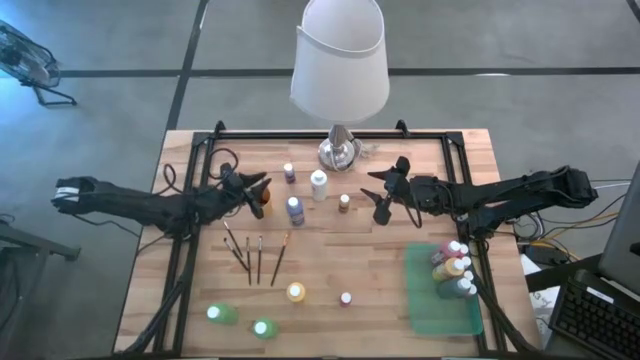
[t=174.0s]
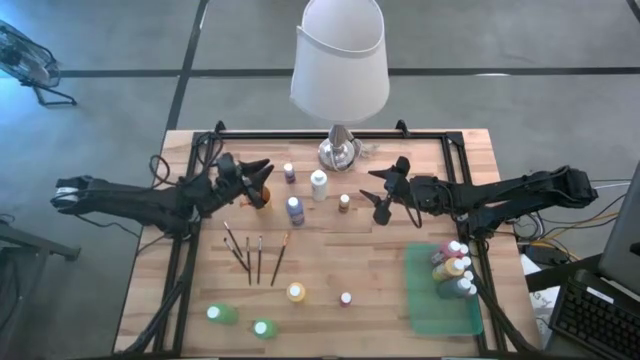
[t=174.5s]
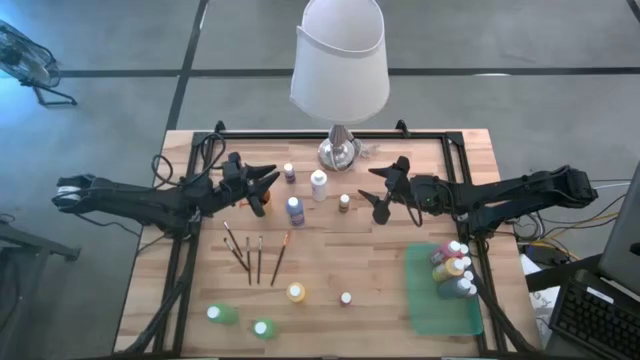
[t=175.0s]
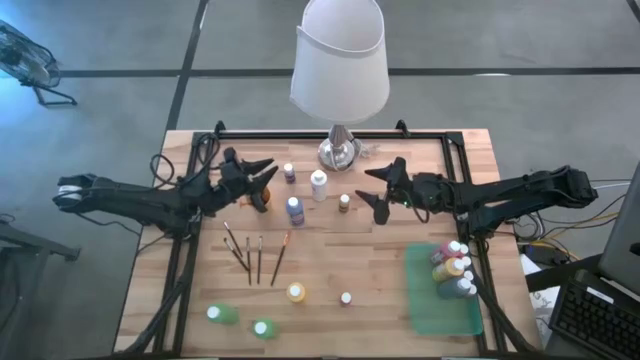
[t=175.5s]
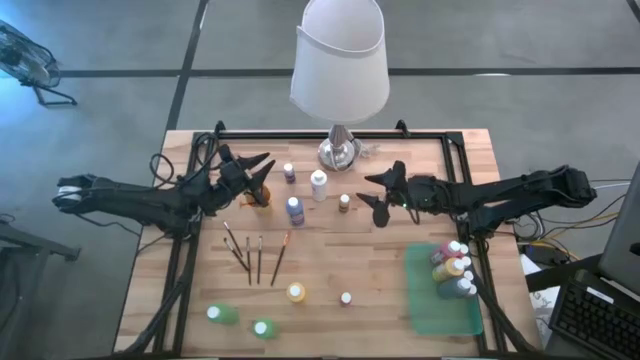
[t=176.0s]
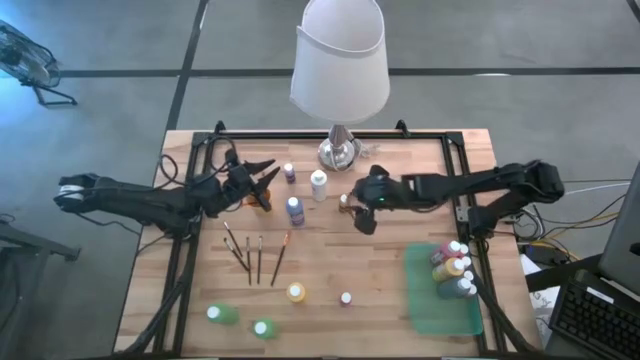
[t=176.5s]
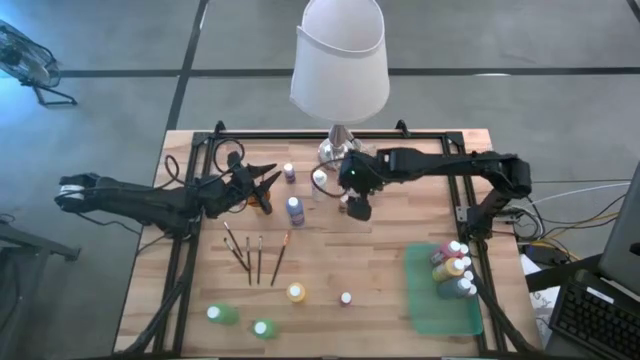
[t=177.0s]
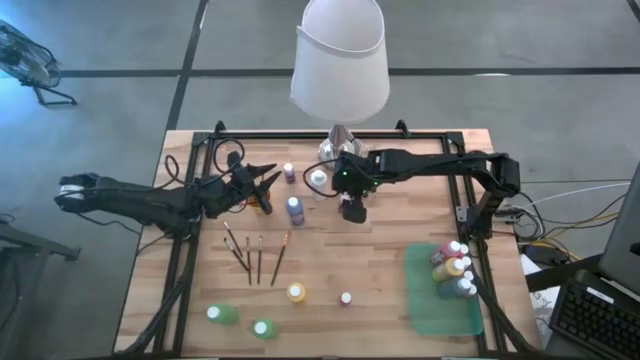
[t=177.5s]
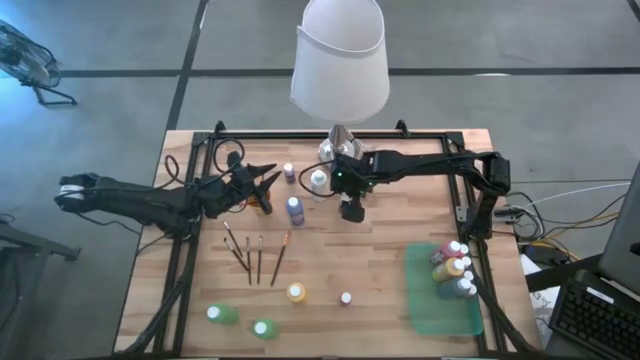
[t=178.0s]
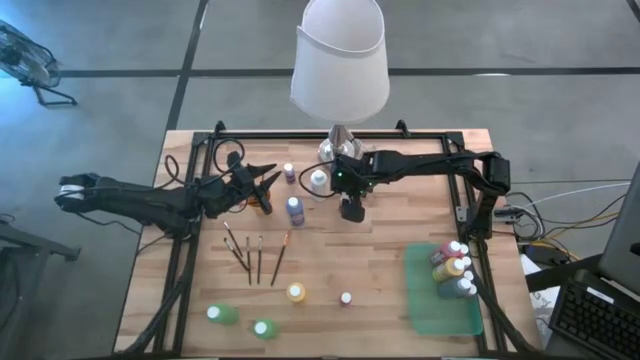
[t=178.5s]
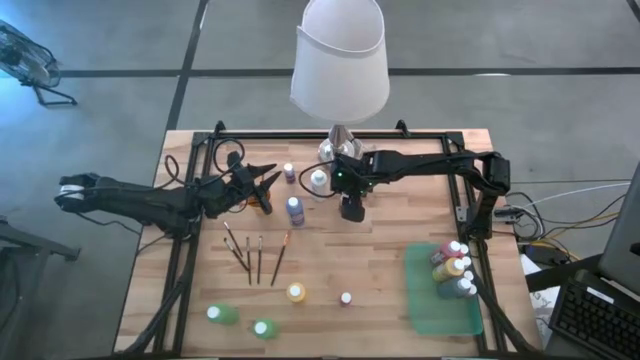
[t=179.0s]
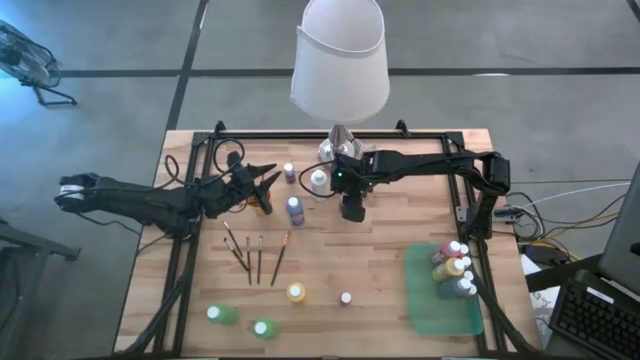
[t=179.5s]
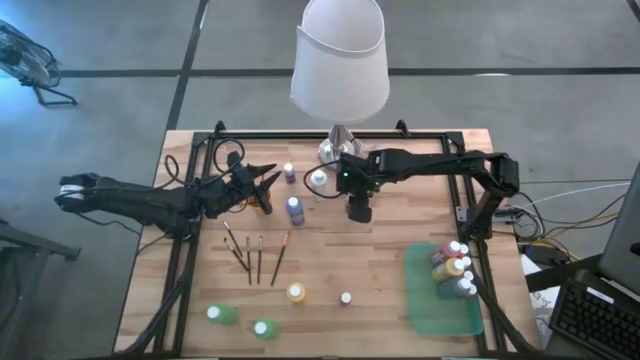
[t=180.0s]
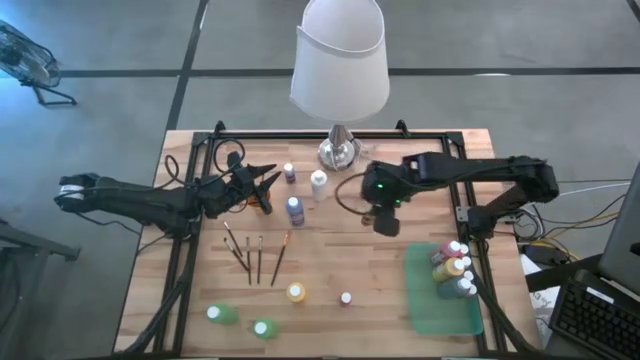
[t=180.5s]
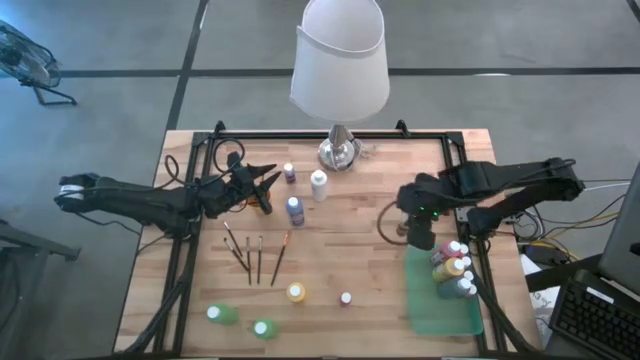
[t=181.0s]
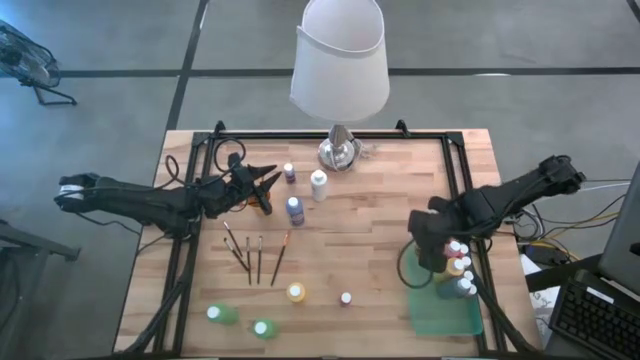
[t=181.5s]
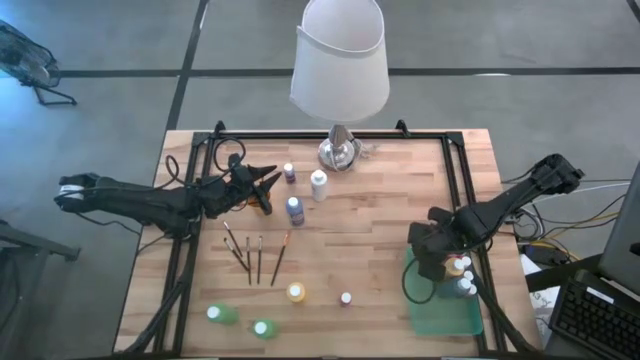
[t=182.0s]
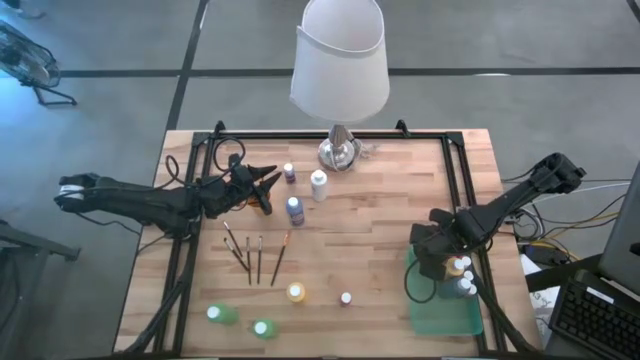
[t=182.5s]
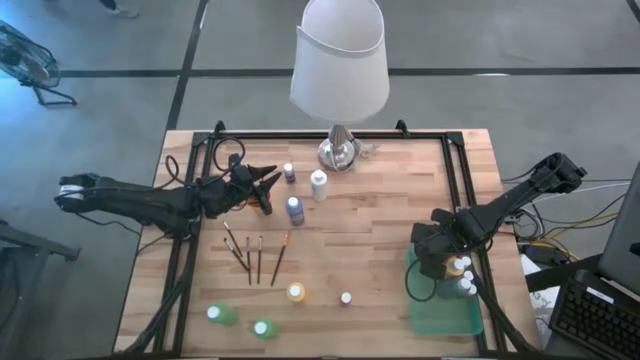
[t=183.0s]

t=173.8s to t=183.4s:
Task: Pick & Place Paint Supplies
Put the yellow paint bottle into the green bin

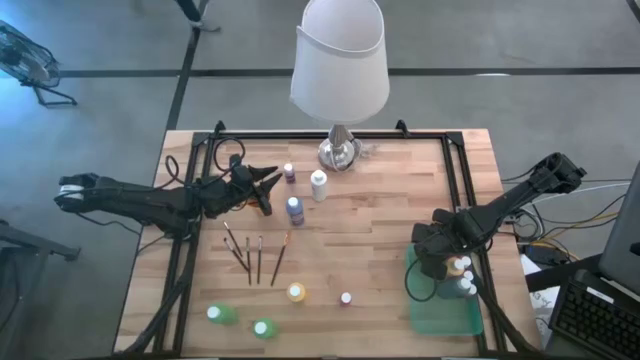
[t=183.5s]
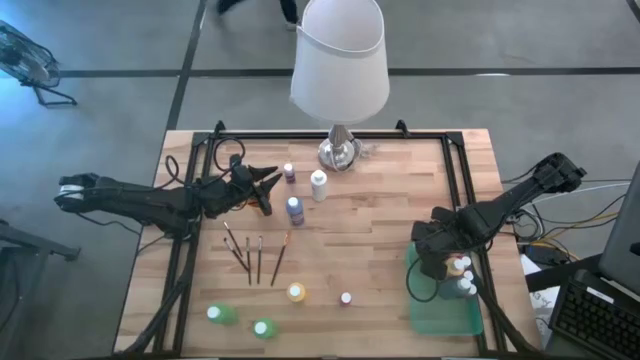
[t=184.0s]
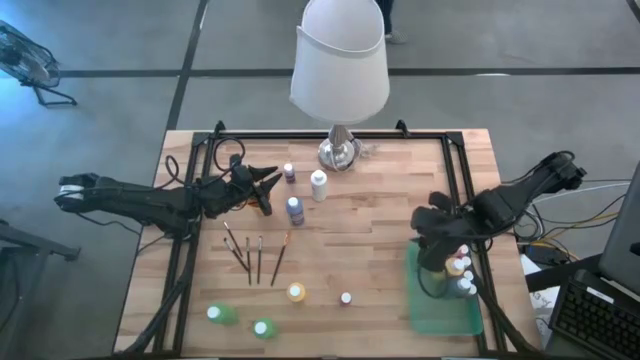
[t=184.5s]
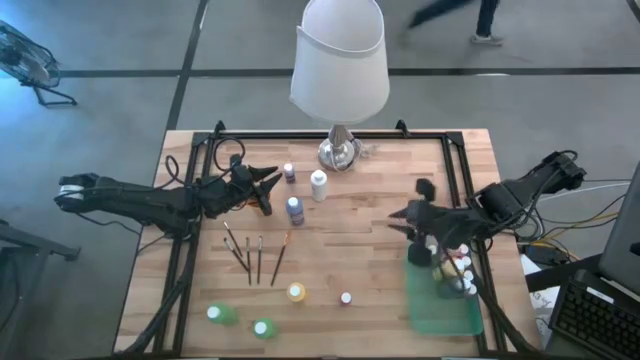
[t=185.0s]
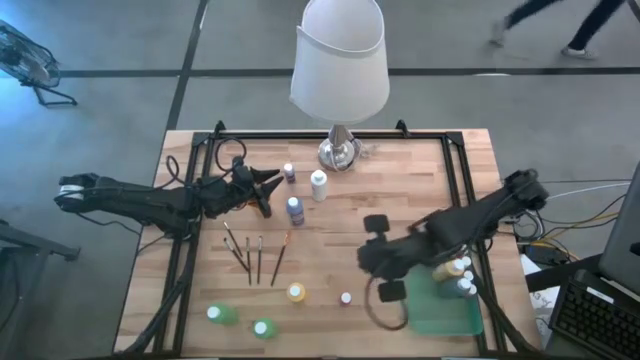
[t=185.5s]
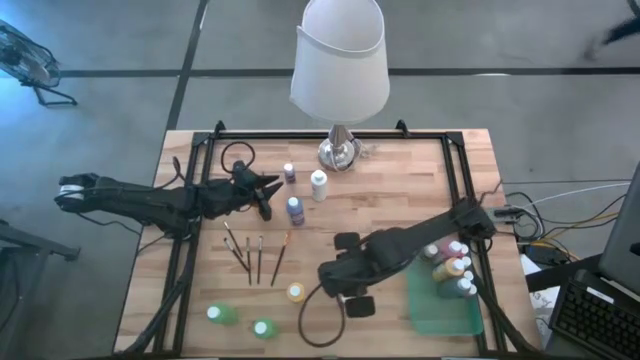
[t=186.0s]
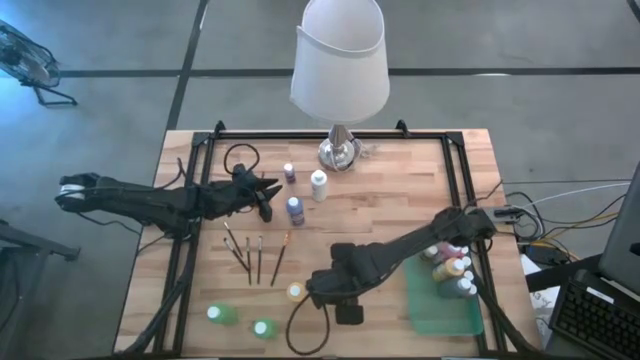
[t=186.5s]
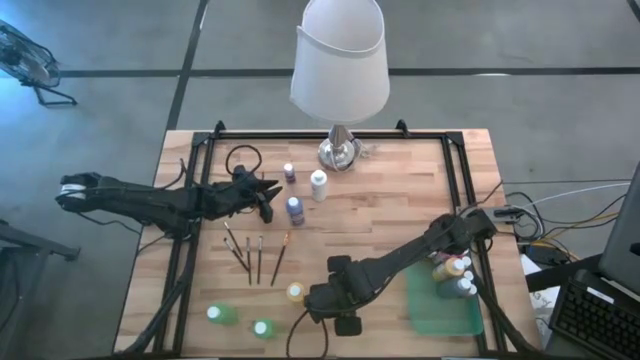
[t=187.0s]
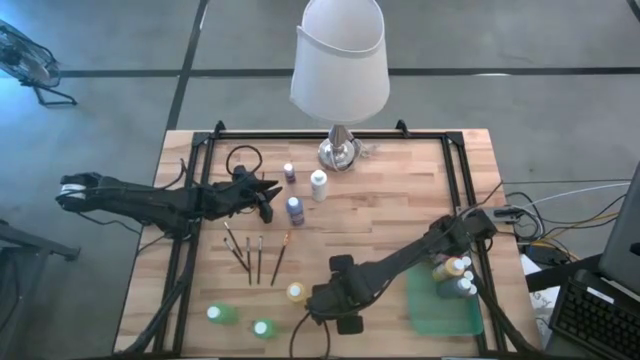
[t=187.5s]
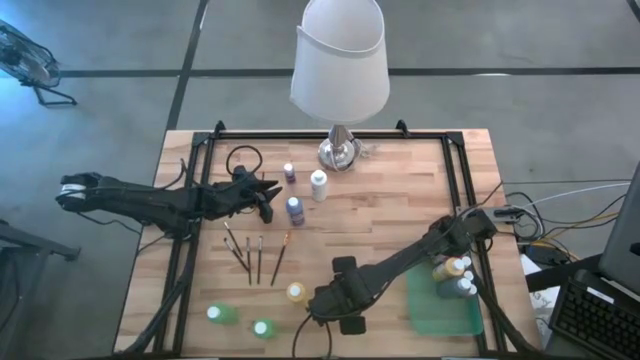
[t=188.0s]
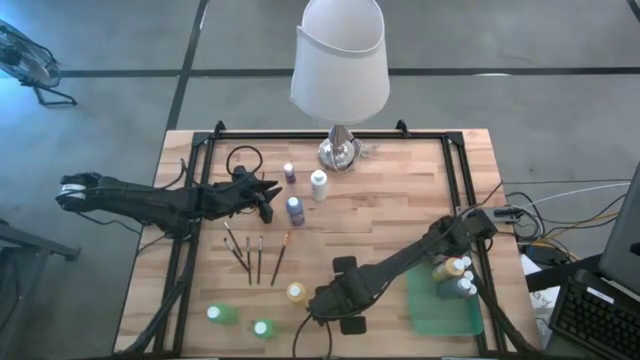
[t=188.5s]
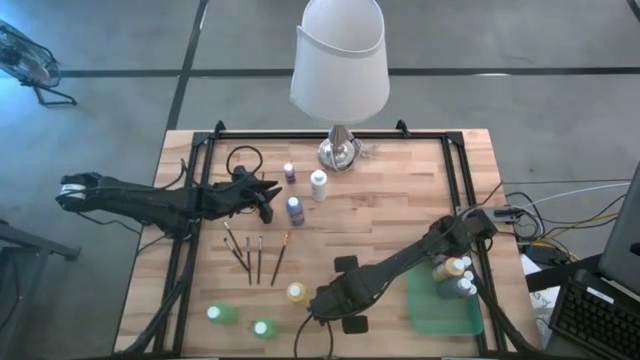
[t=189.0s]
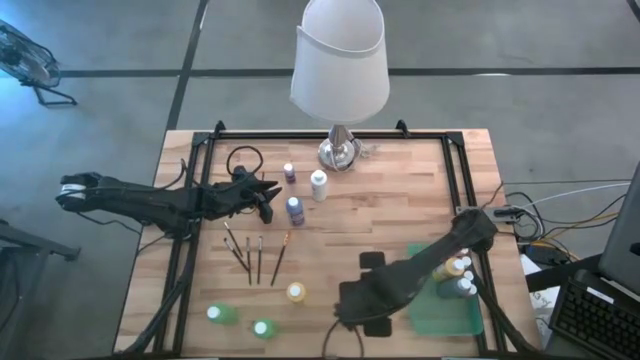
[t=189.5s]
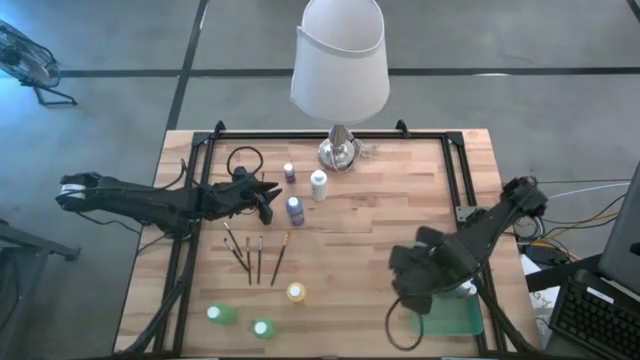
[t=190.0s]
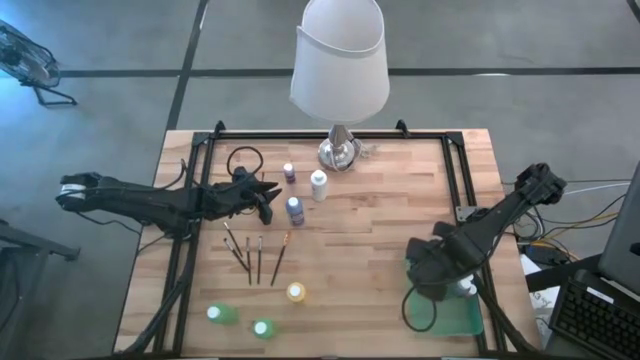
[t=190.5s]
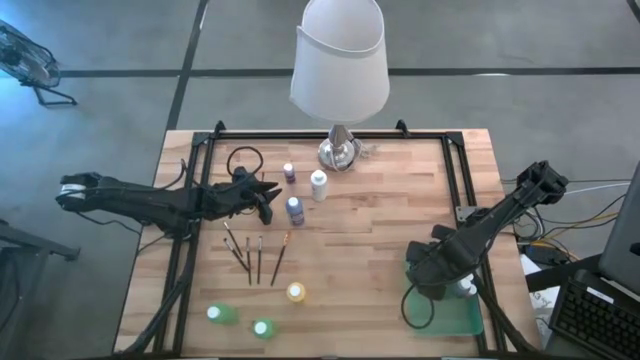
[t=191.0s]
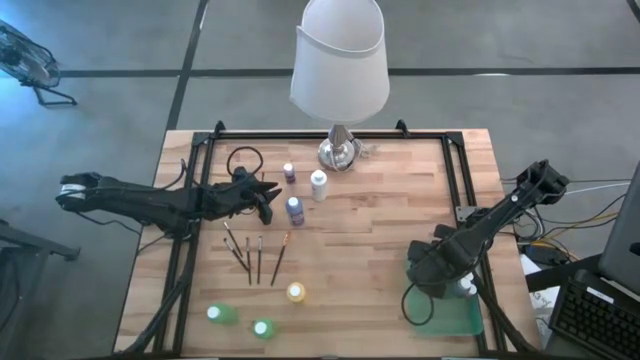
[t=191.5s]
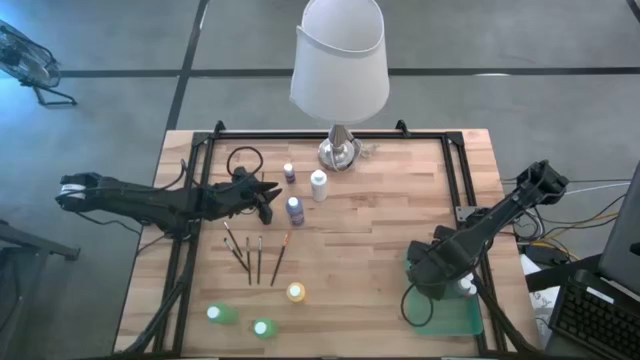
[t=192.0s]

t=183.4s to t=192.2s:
Put the red paint bottle into the green bin
